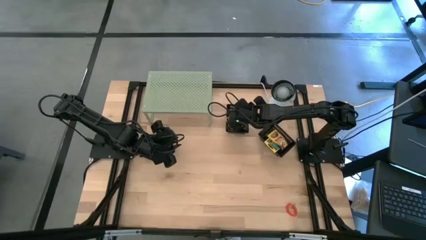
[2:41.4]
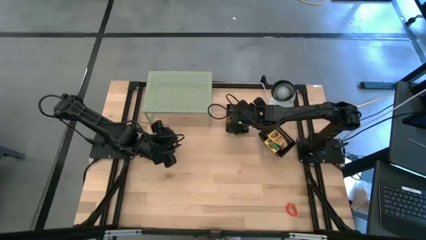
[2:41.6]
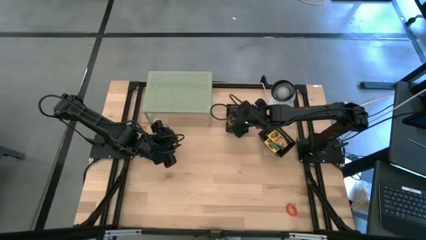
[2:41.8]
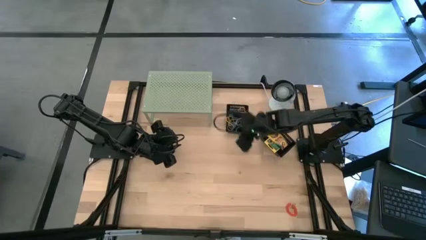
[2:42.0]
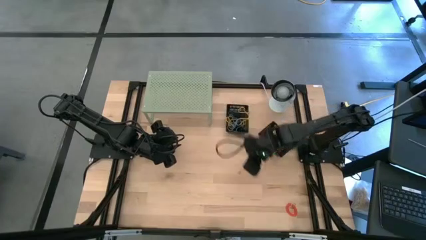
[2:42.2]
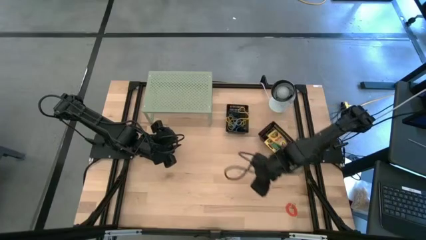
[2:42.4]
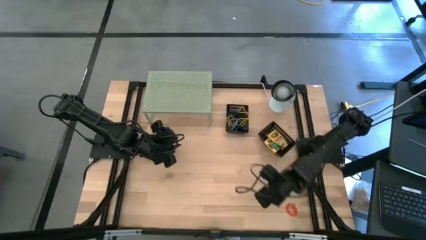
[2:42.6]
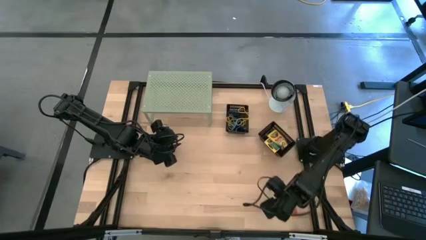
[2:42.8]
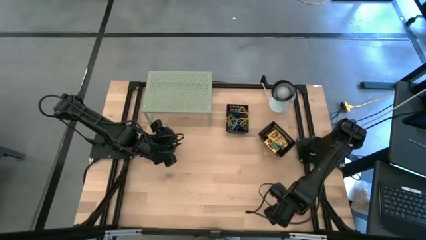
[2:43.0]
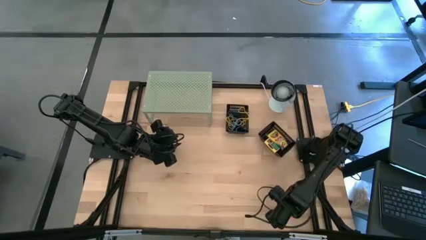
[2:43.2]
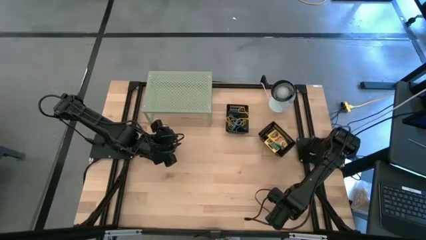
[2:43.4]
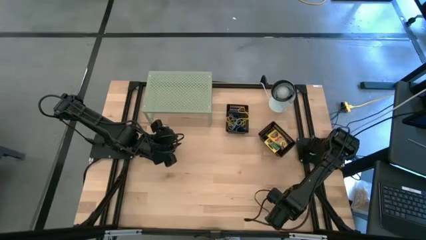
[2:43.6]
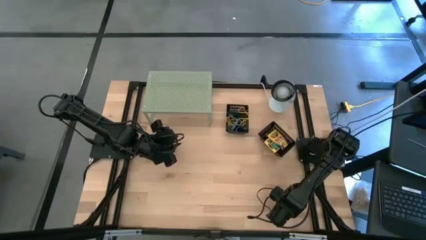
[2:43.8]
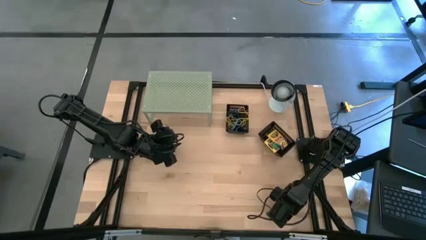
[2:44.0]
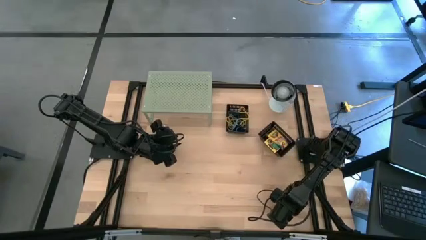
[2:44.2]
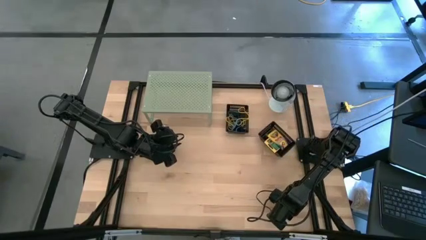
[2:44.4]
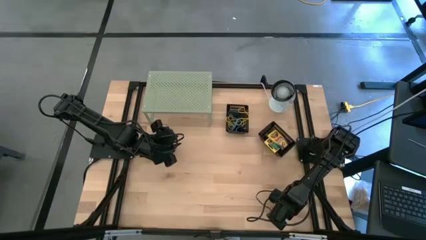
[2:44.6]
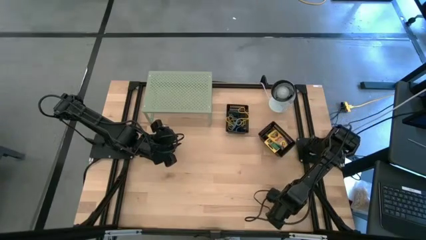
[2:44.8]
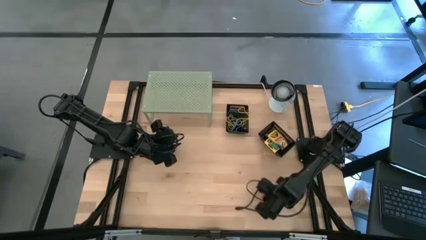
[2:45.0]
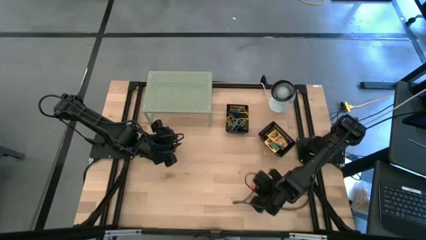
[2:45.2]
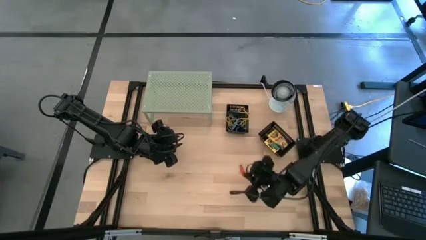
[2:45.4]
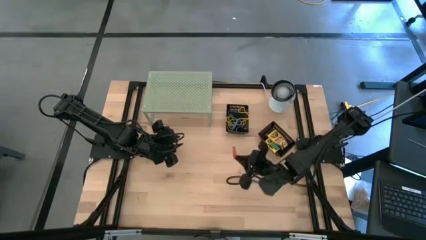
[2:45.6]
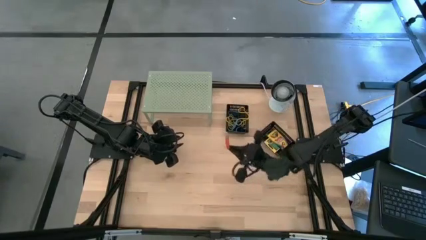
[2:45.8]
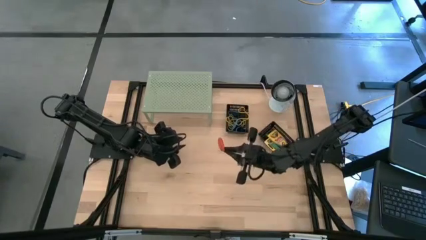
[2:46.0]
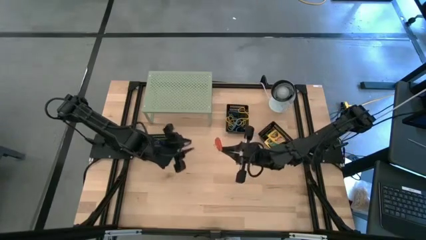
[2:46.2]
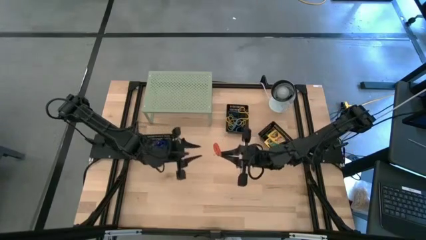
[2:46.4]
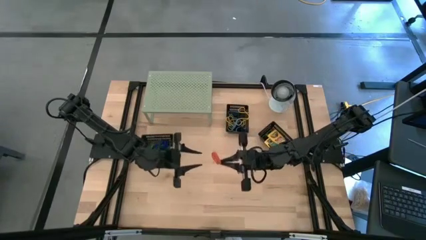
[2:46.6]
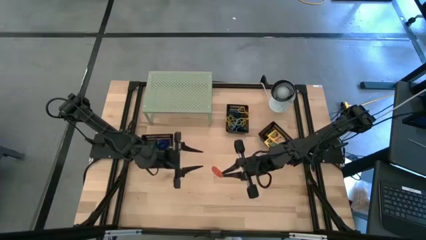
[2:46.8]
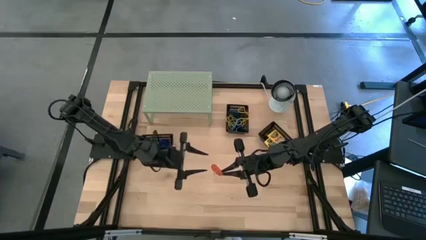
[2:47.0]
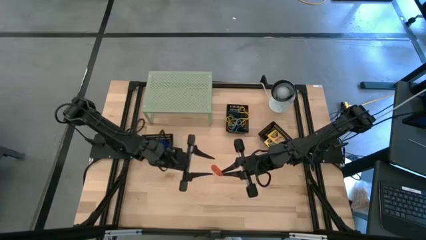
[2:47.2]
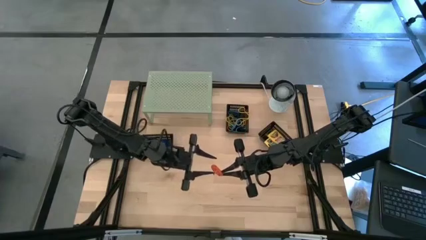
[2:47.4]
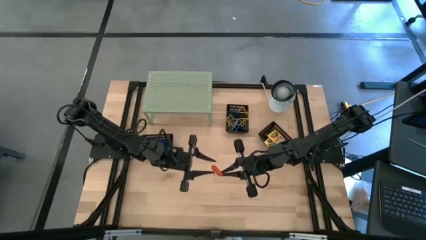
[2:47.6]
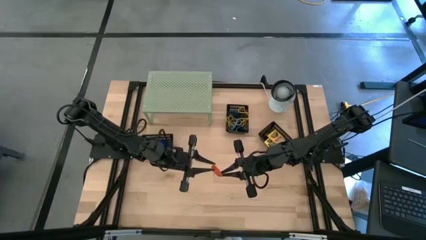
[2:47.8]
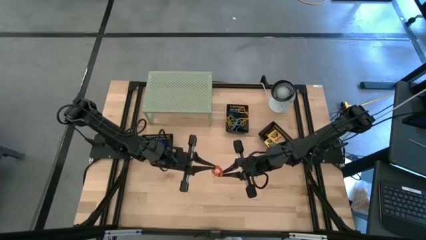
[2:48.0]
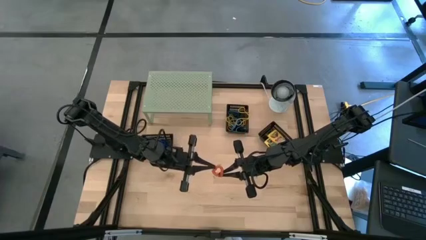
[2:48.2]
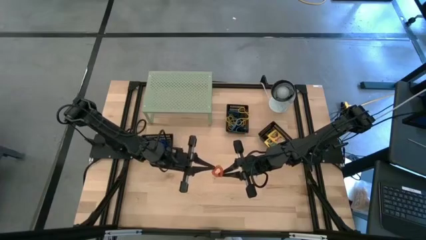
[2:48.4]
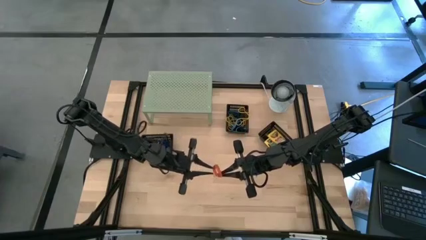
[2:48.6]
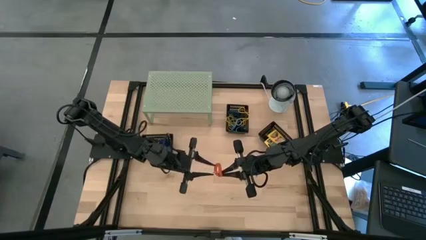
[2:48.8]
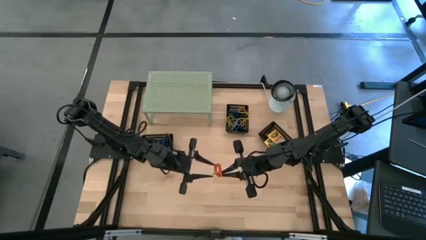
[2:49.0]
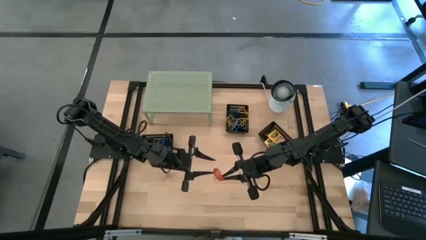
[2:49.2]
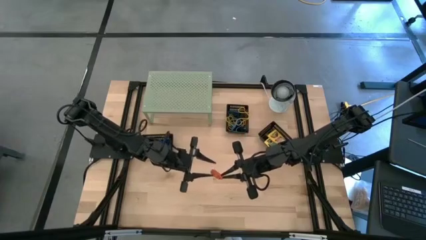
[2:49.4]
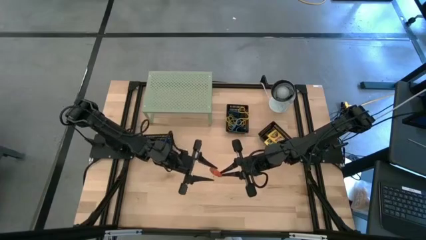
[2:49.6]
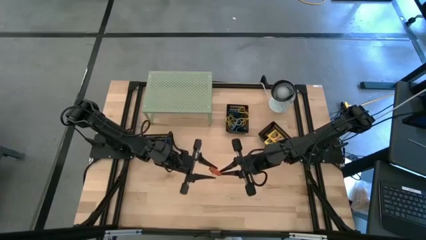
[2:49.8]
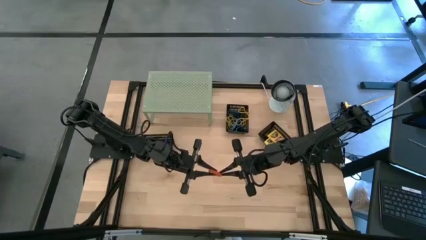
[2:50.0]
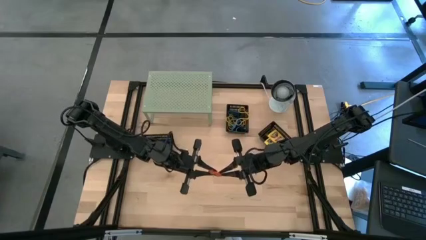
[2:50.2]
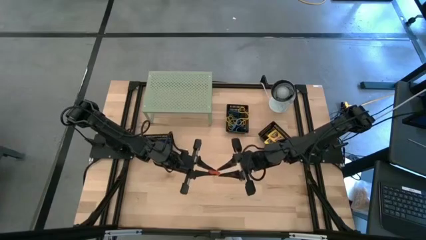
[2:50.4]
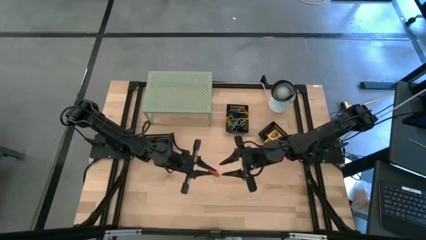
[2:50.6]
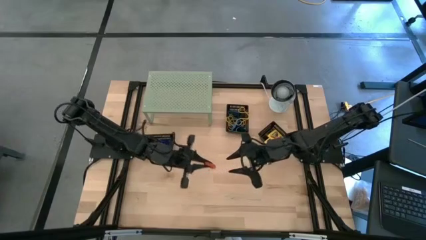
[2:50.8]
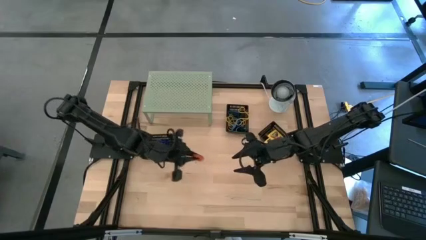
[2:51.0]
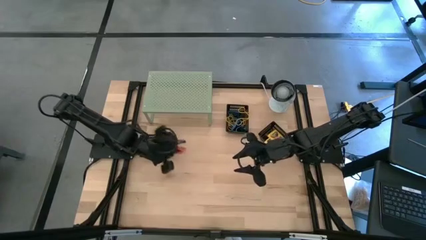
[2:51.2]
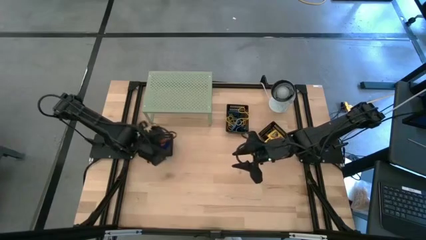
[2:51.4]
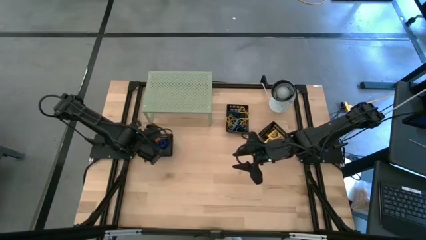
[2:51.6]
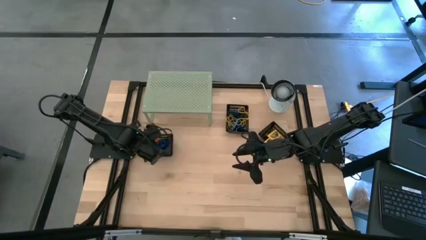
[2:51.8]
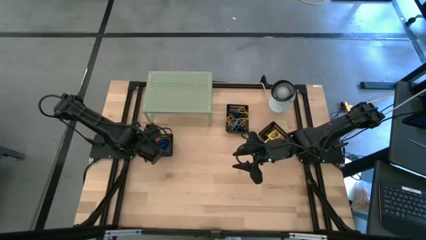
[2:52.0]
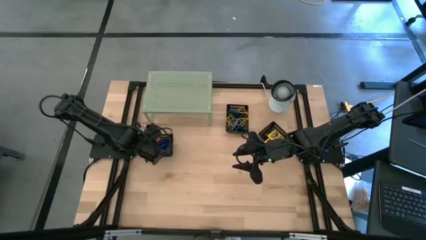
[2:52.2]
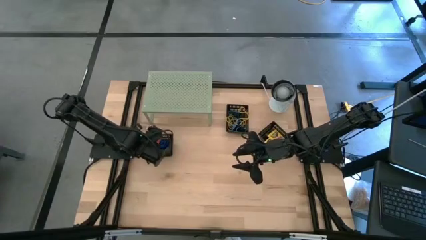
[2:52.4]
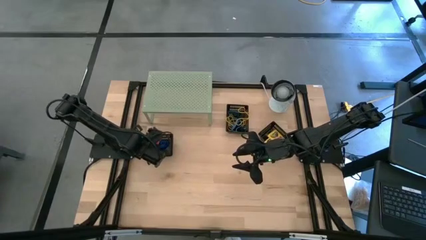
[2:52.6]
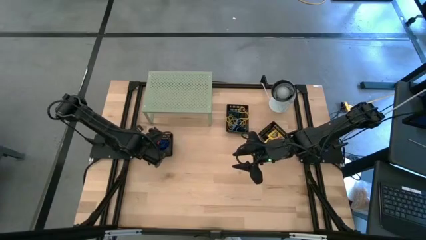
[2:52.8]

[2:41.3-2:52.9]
Task: Pick & Place Office Desk Supplies
Put the orange spring rubber band into the left black bin

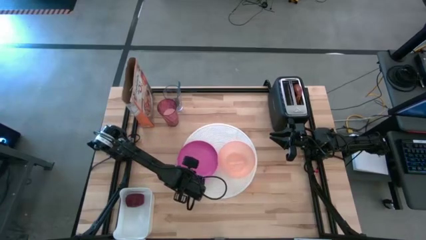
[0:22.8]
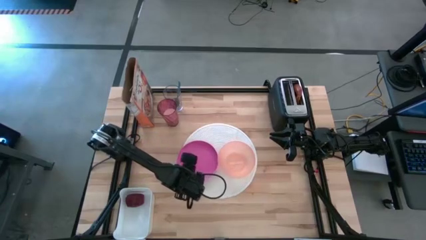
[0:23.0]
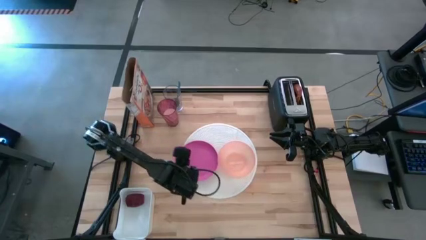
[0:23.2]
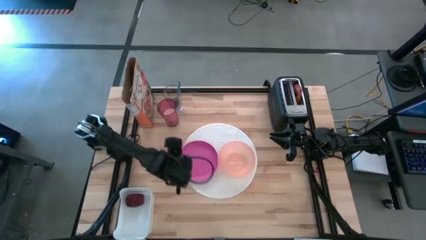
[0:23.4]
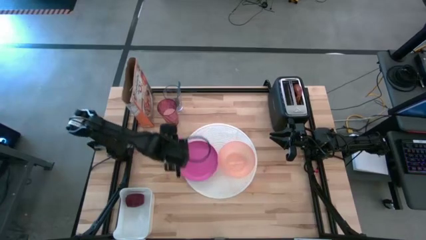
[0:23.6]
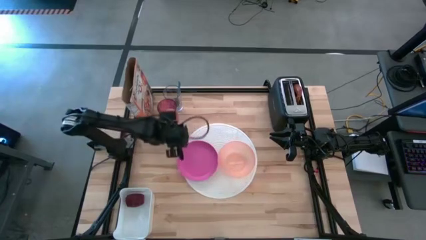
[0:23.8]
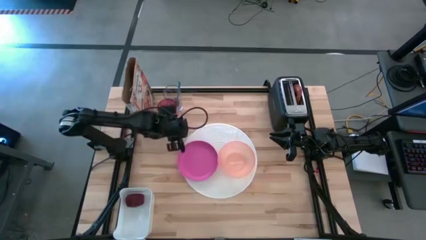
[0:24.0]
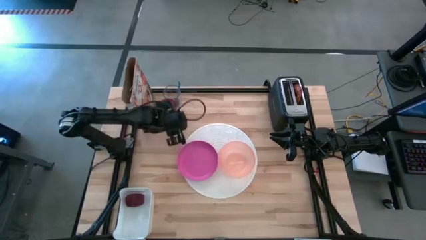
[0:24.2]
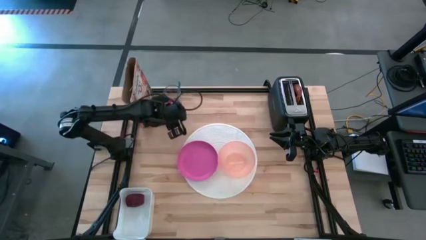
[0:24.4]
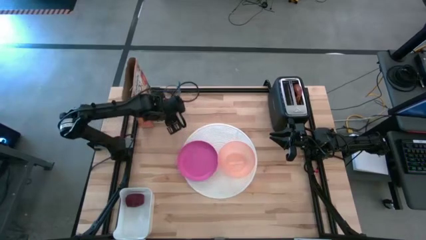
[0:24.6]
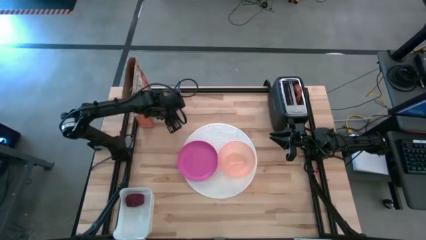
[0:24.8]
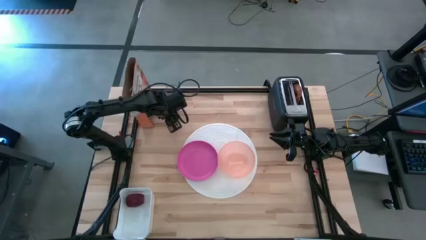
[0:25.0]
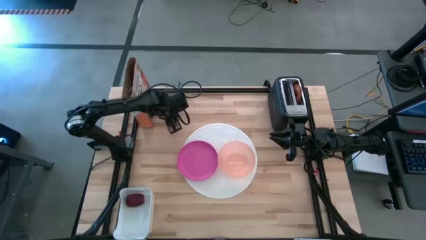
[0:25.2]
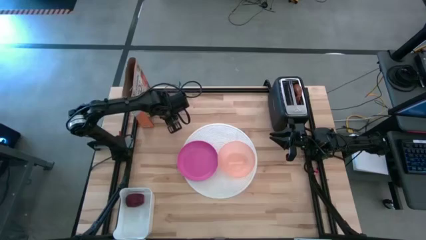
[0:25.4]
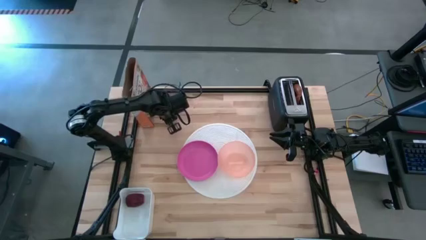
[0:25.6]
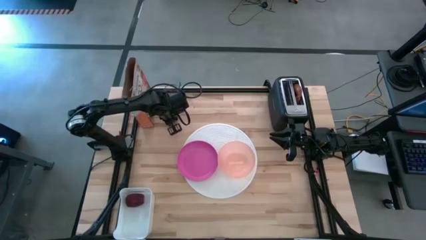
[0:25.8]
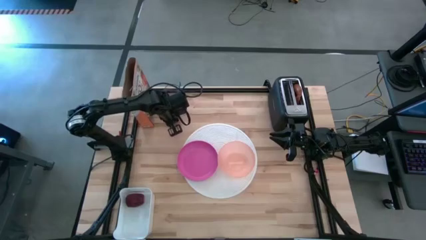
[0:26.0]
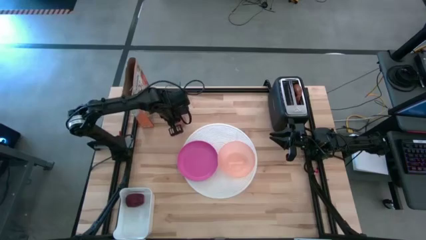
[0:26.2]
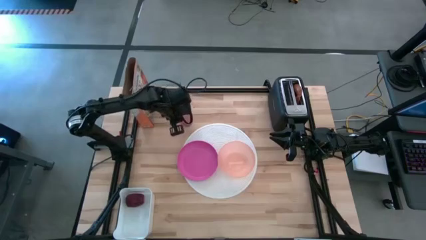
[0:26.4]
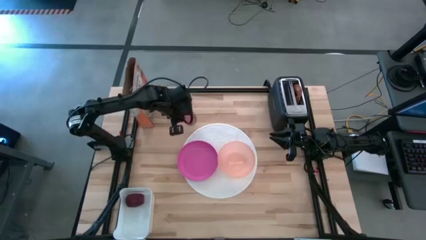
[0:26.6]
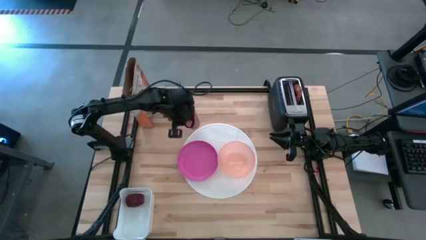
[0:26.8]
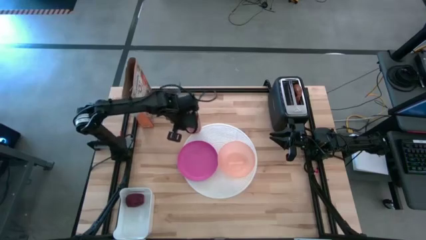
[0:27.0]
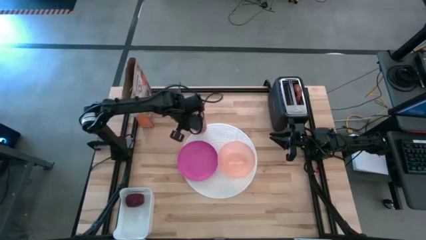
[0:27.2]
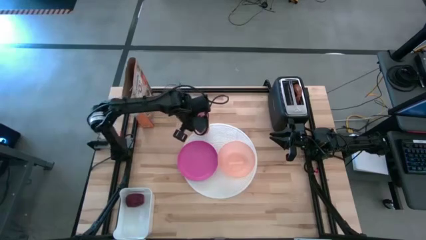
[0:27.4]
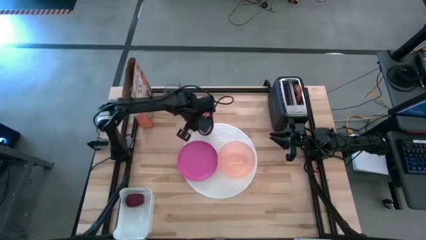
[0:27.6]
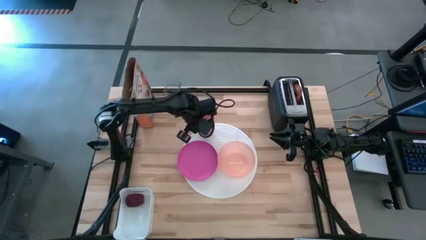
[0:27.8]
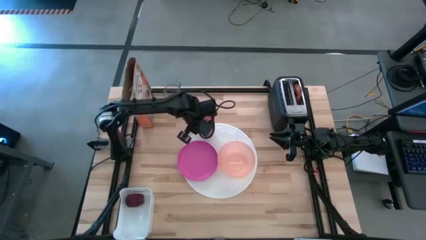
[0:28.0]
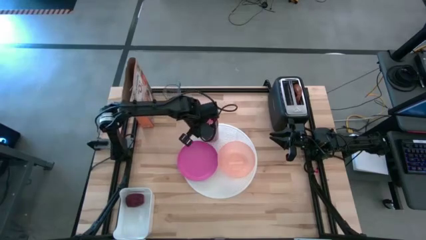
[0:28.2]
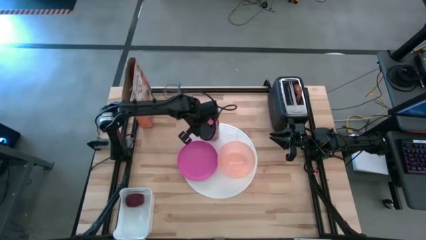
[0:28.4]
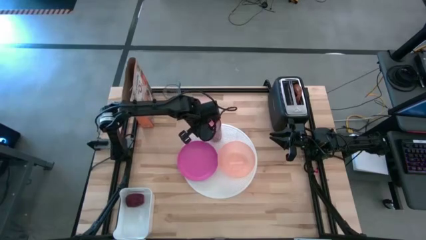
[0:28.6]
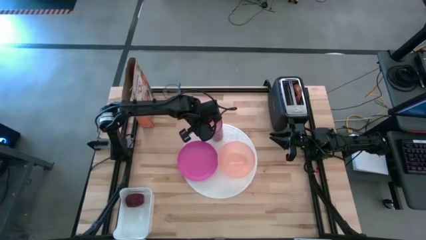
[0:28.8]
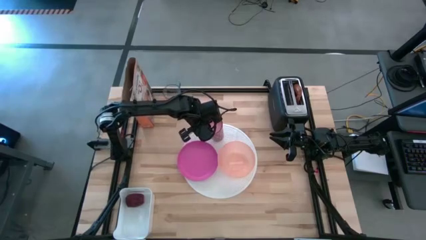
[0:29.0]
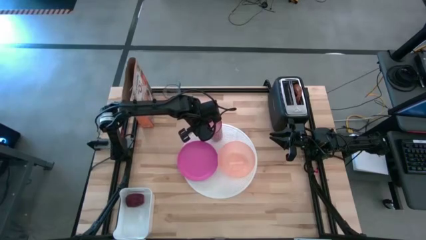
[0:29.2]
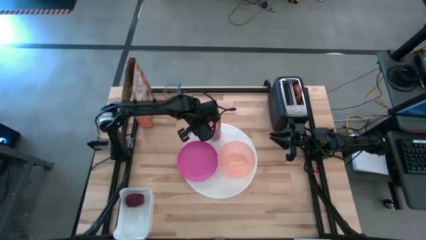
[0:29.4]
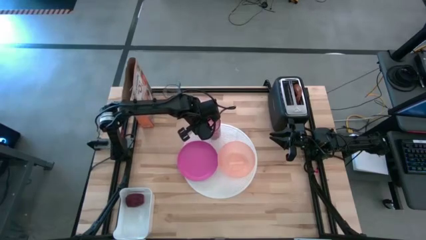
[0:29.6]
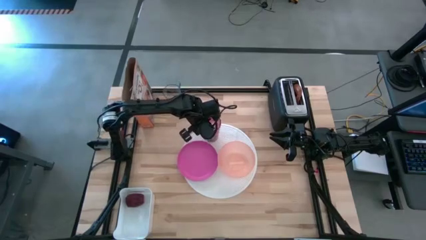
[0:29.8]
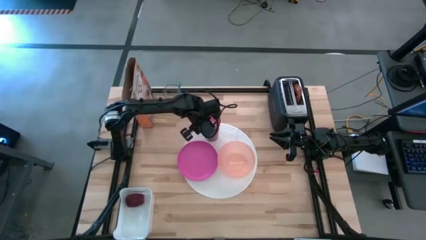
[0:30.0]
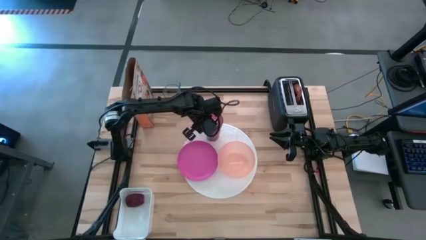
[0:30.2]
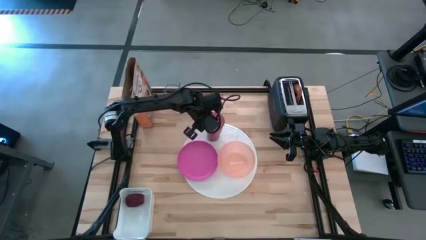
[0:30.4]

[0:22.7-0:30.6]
Task: Arrange a breakfast setting
Put the red cup on the white placemat
